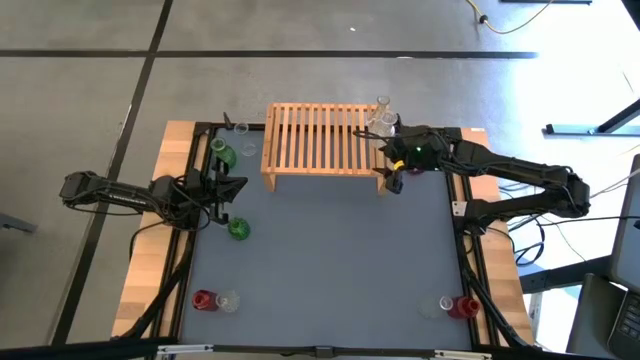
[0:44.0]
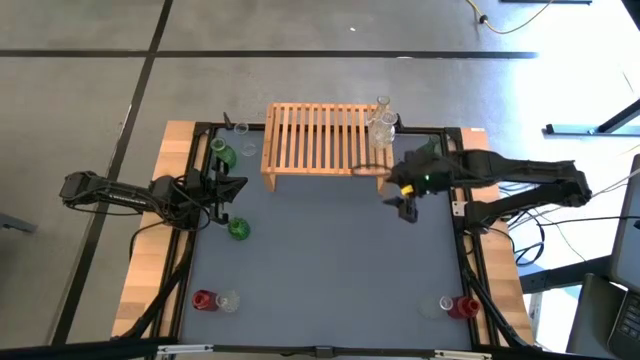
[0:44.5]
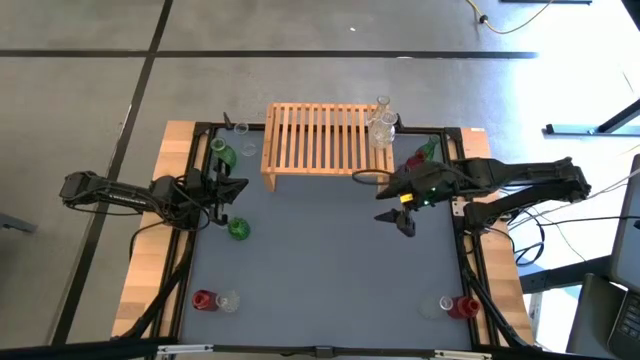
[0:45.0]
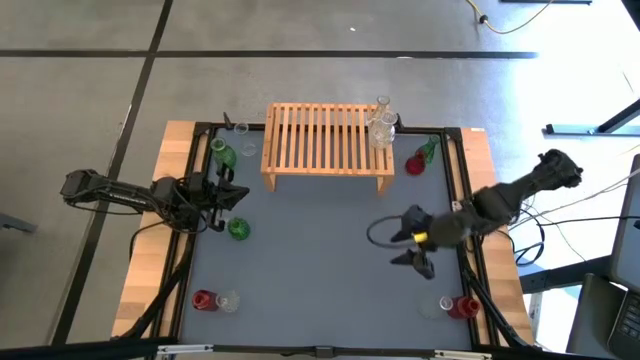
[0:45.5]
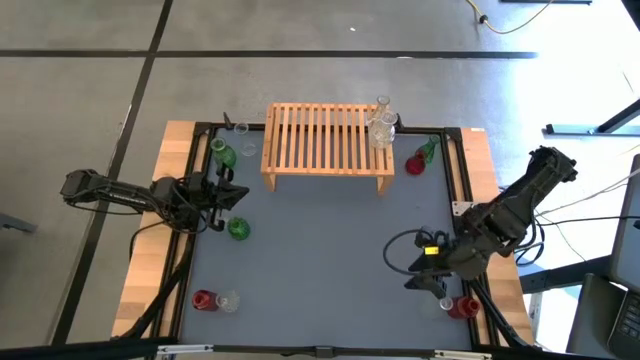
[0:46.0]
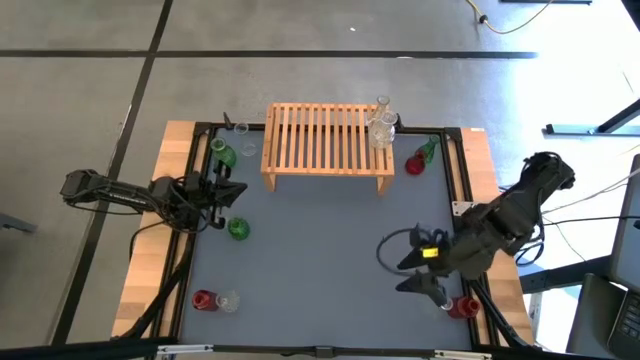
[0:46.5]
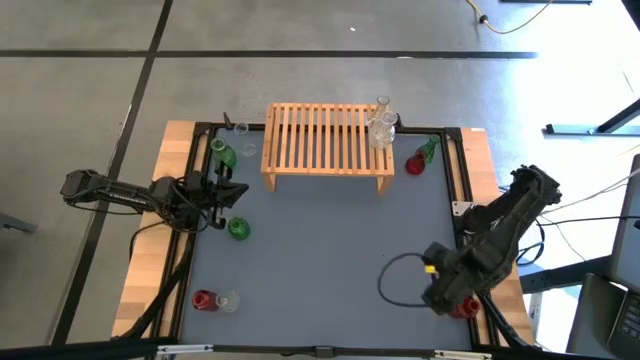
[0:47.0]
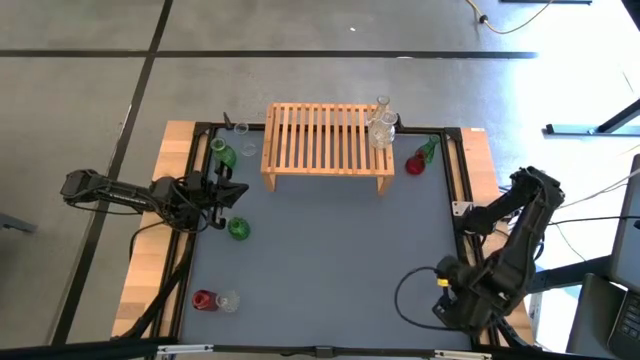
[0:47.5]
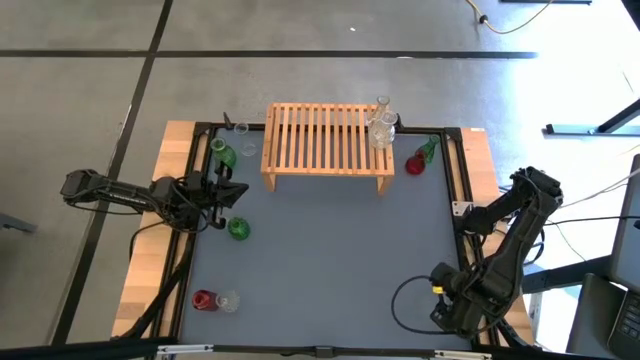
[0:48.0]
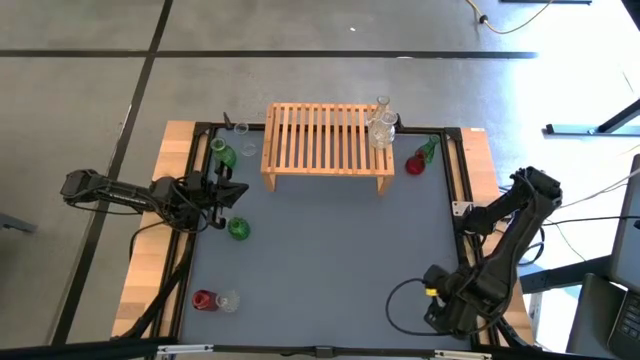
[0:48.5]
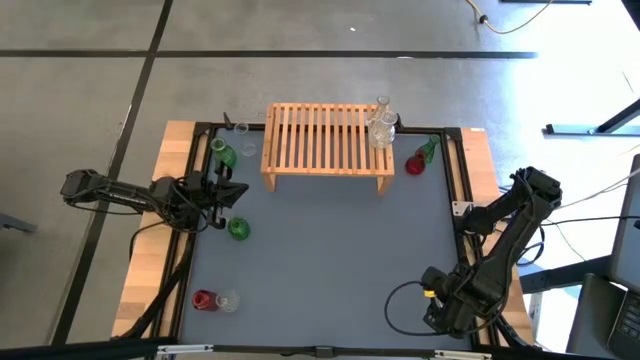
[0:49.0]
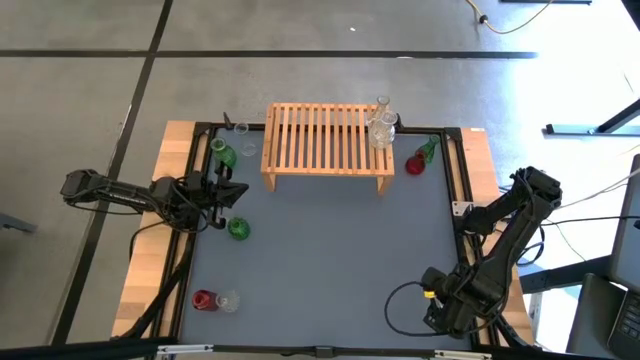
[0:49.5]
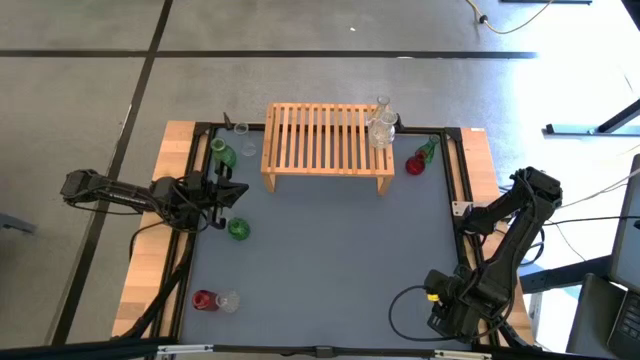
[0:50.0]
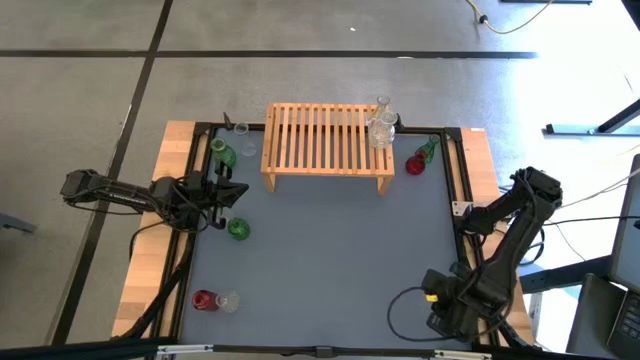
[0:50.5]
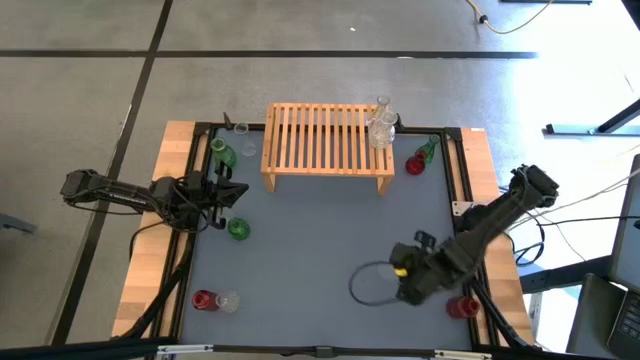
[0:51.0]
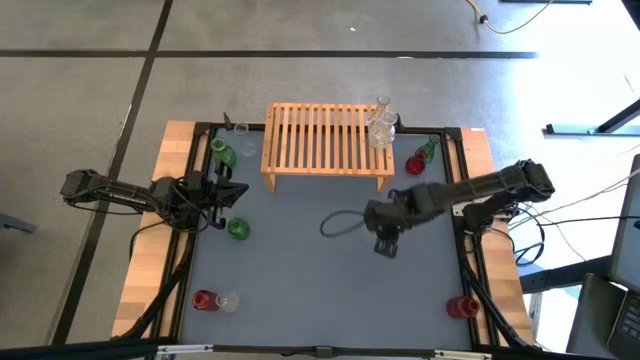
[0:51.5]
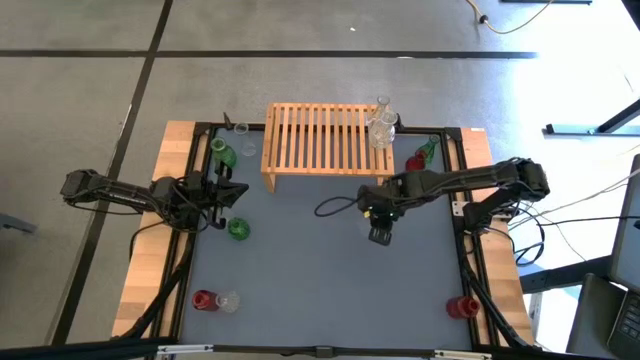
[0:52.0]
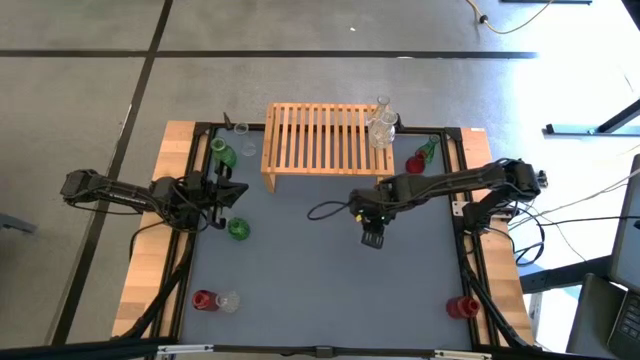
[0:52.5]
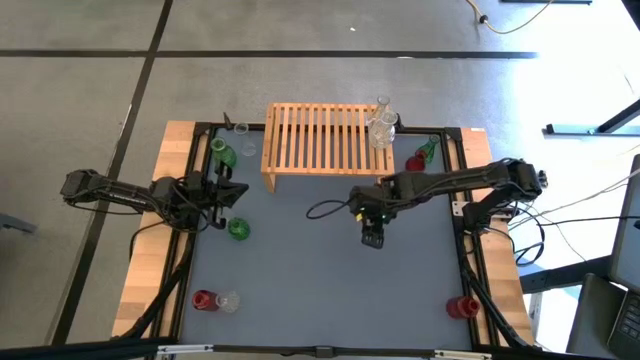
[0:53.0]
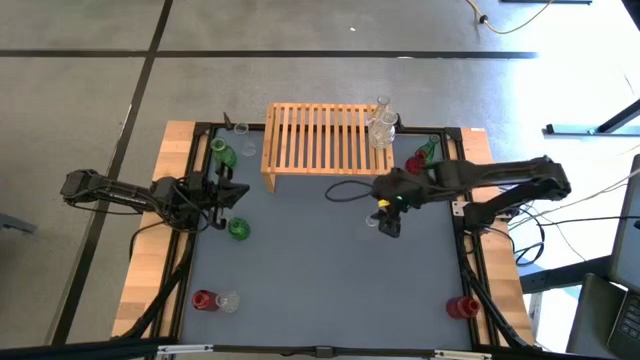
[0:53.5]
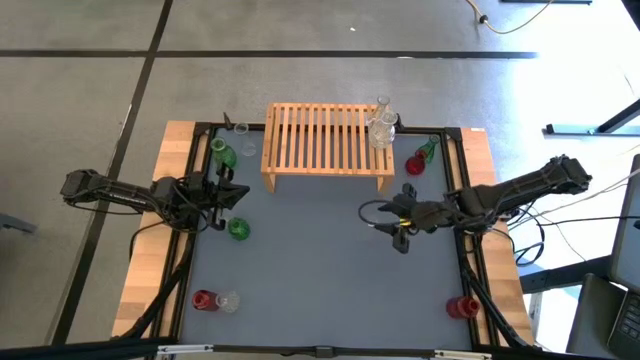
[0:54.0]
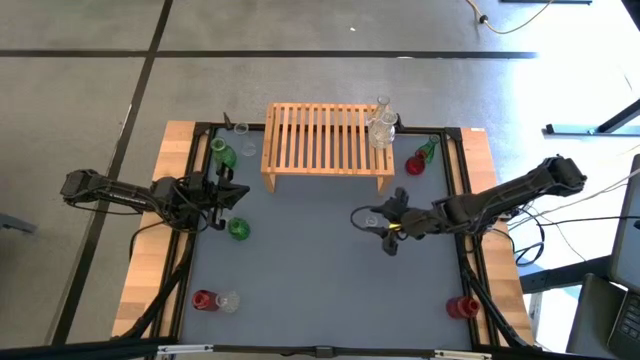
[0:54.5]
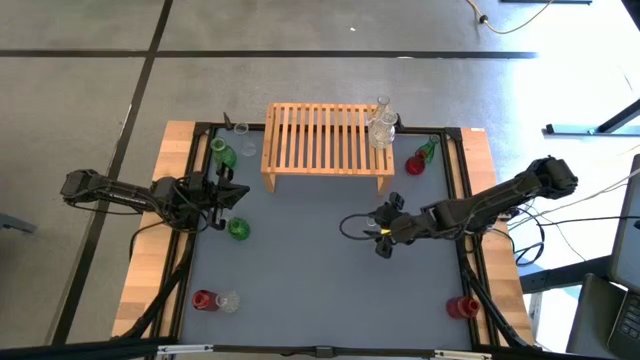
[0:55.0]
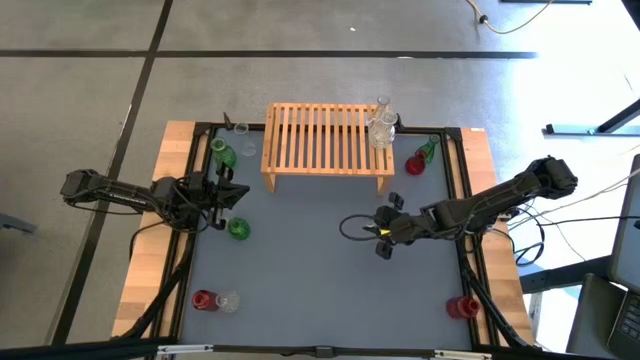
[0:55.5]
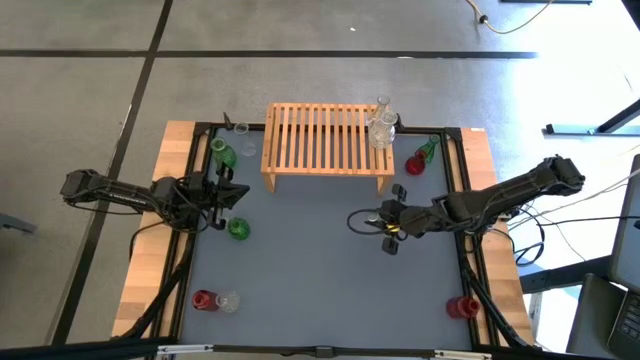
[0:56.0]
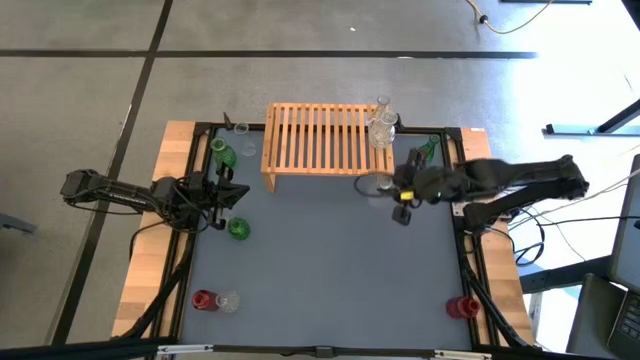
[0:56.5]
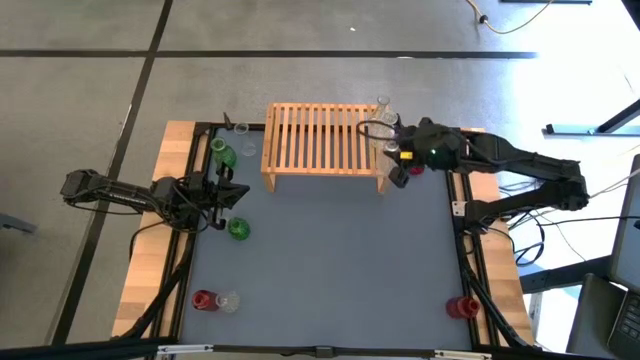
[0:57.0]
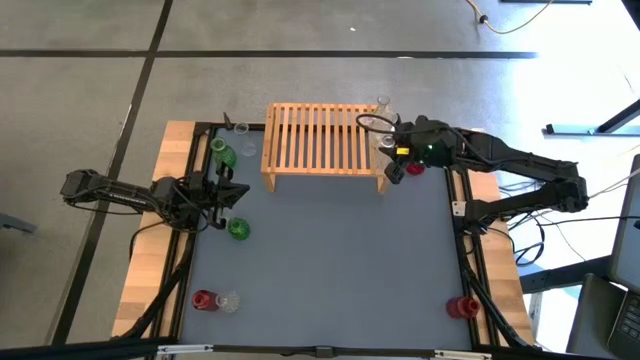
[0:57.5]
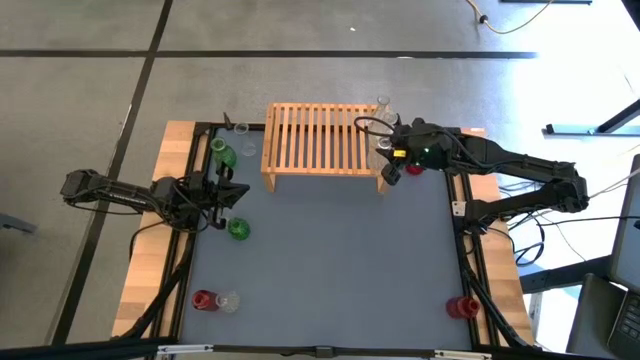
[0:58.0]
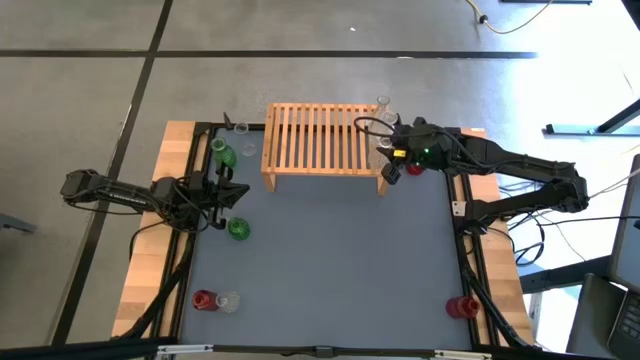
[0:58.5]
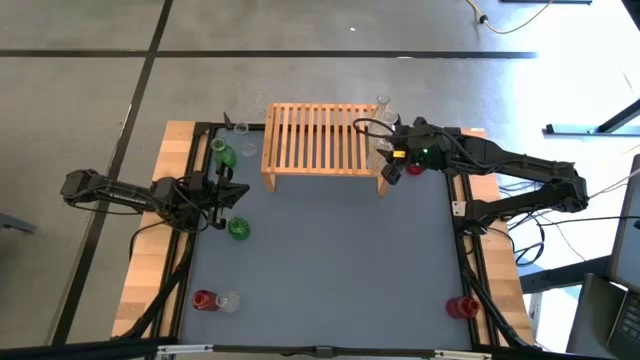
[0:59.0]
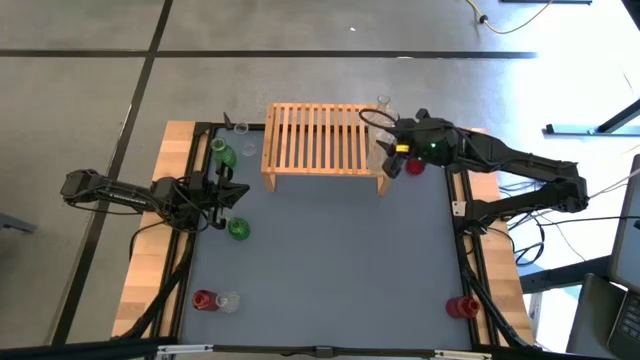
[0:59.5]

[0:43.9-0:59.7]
Task: sort vases onto shelf
Put the transparent vase on the shelf aligned with the other transparent vase

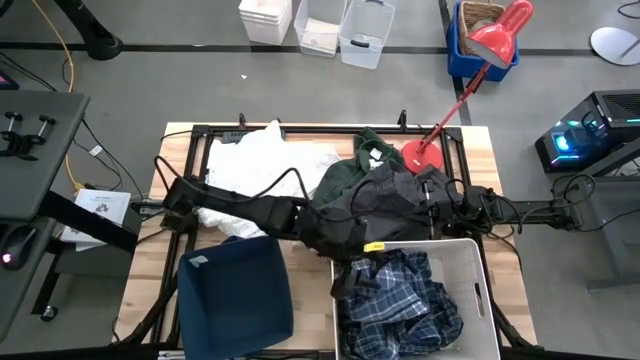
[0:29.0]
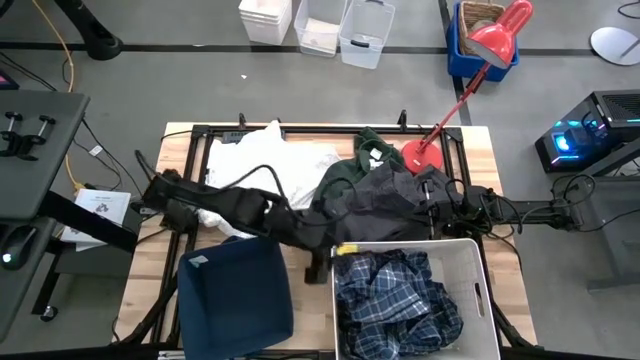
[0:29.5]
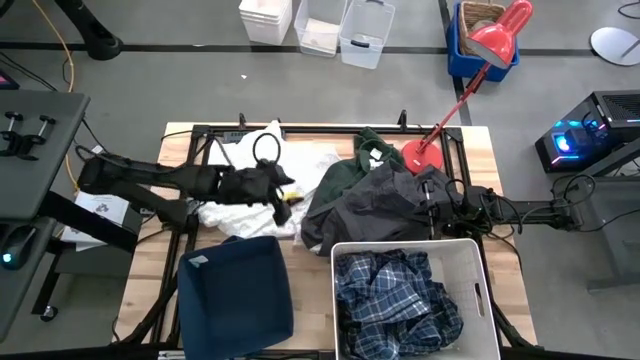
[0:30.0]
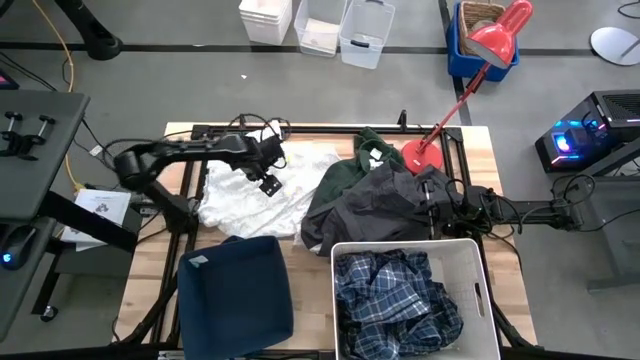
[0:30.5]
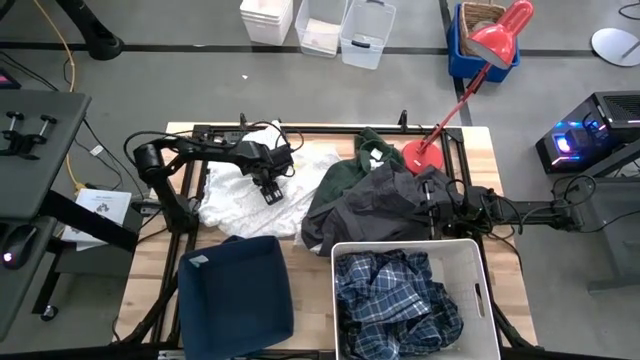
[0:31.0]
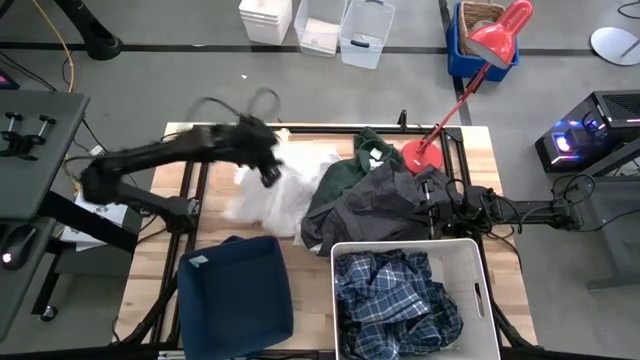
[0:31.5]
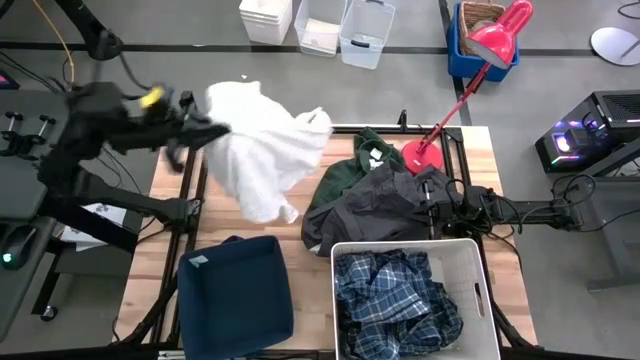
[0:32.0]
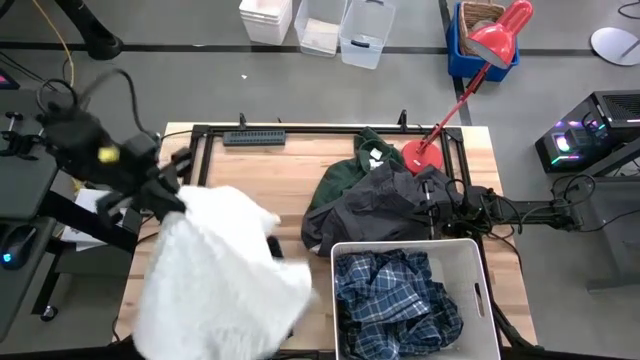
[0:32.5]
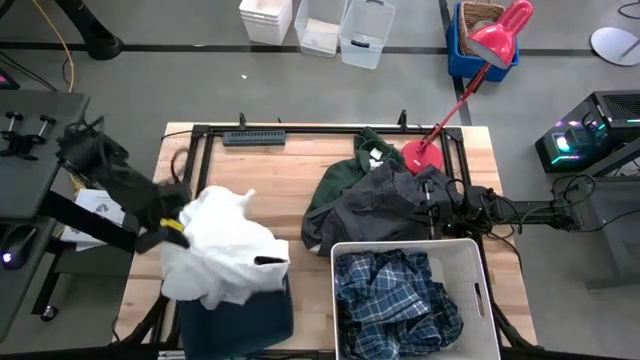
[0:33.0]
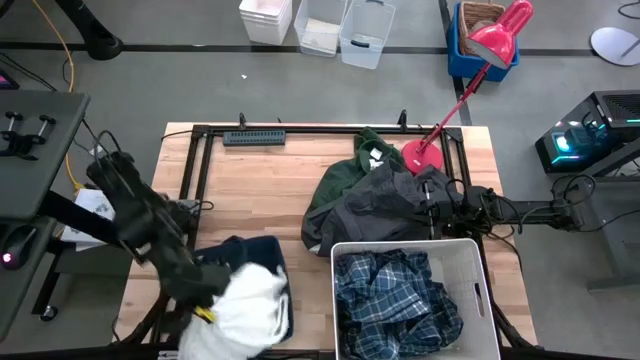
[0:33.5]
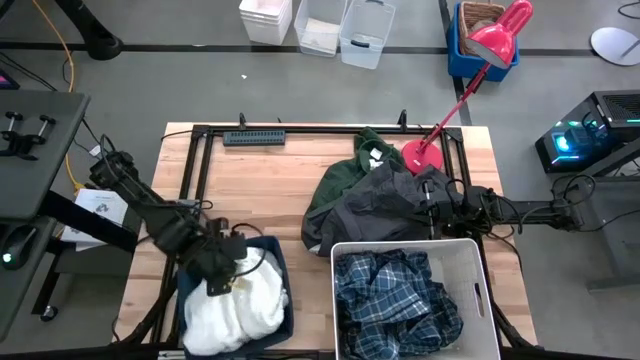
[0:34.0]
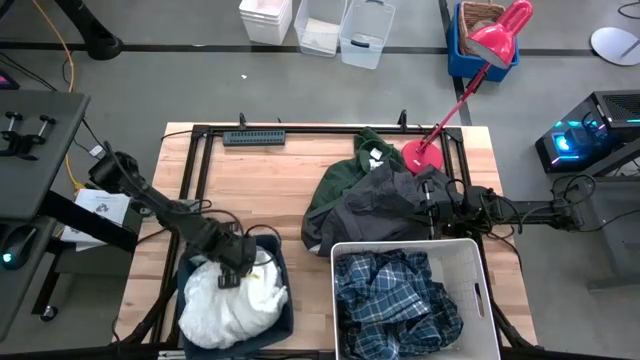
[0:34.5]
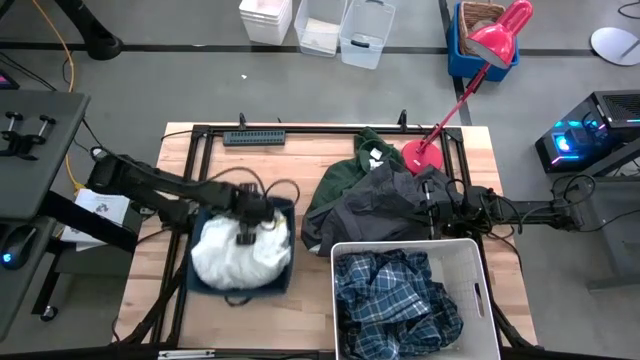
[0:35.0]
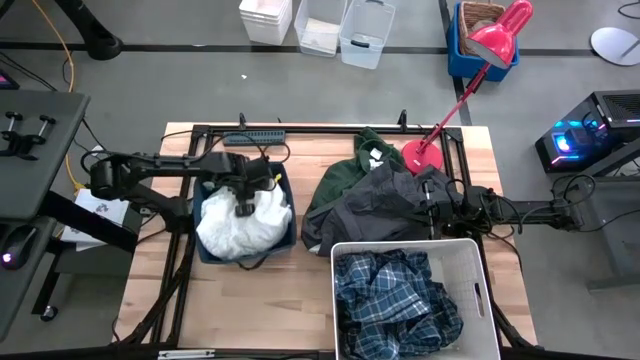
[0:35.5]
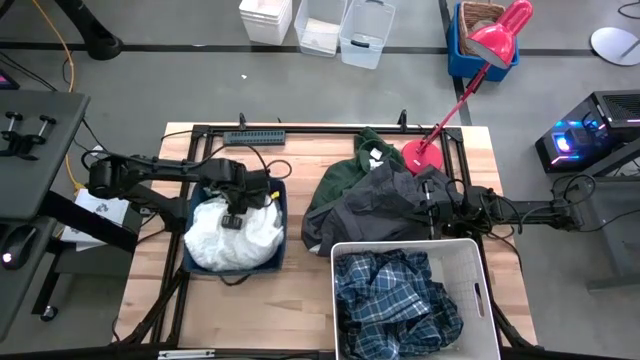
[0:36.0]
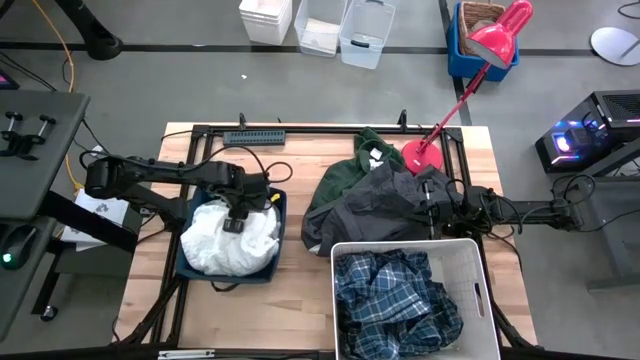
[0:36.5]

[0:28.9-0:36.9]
Task: Sort clothes
Put the white dress into the blue laundry bin
